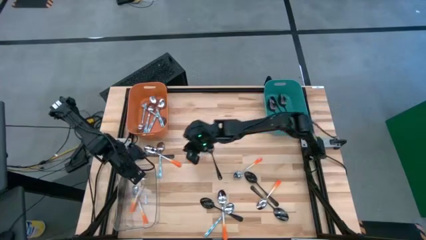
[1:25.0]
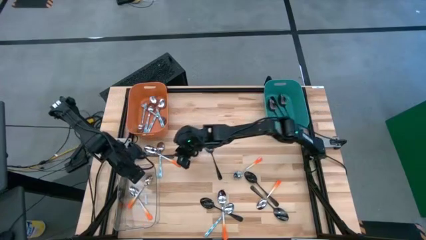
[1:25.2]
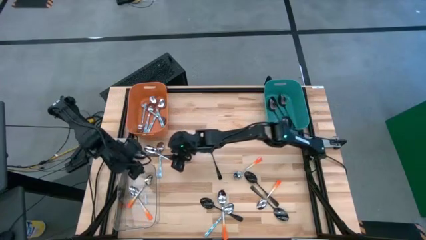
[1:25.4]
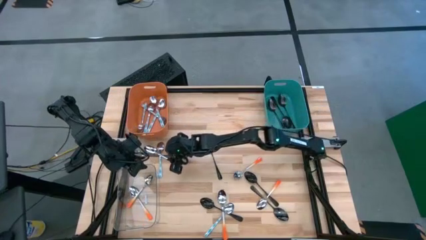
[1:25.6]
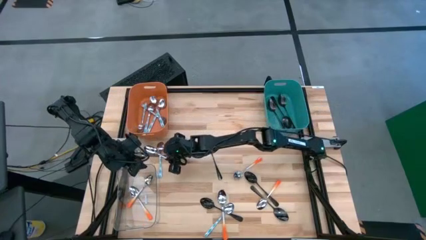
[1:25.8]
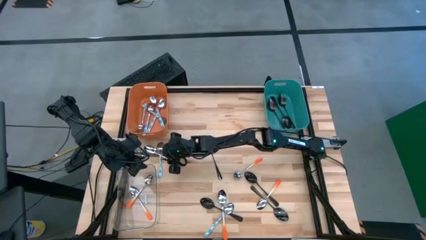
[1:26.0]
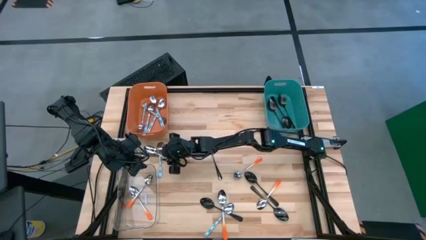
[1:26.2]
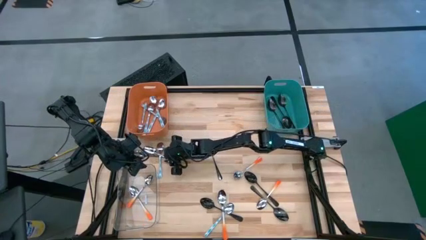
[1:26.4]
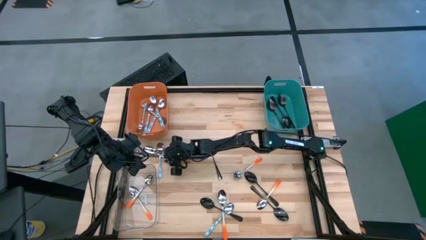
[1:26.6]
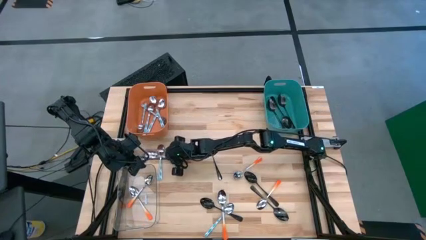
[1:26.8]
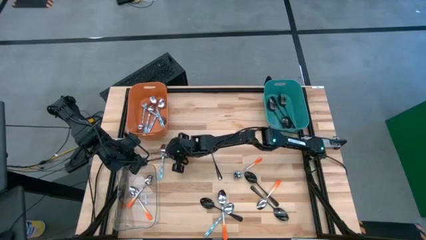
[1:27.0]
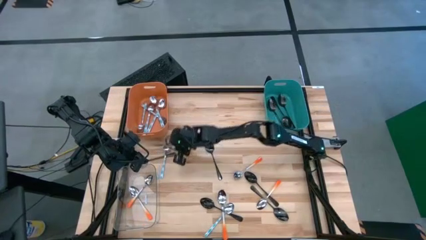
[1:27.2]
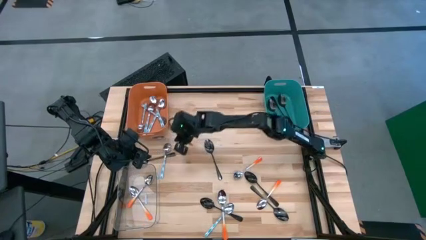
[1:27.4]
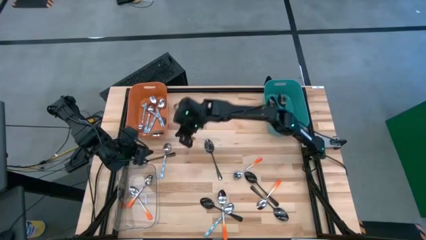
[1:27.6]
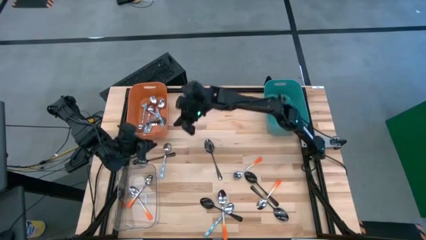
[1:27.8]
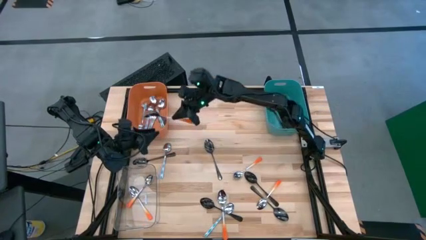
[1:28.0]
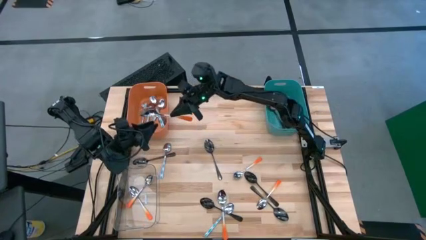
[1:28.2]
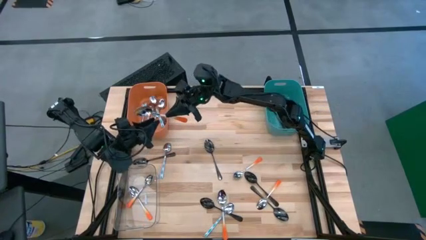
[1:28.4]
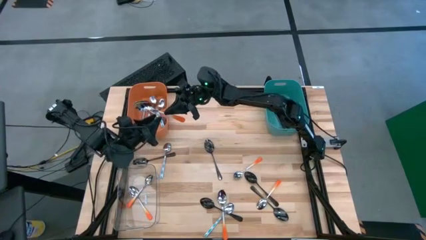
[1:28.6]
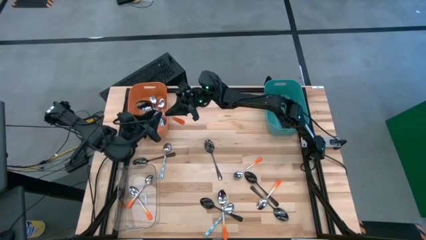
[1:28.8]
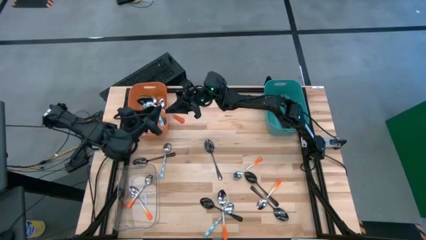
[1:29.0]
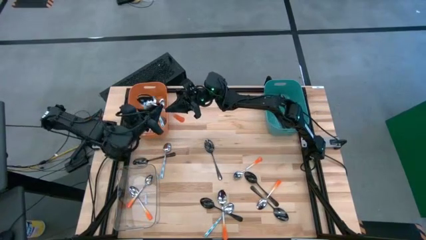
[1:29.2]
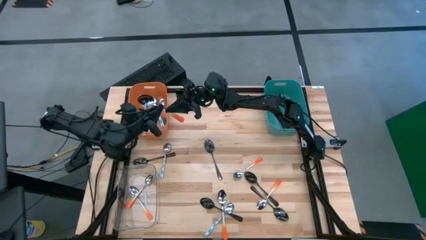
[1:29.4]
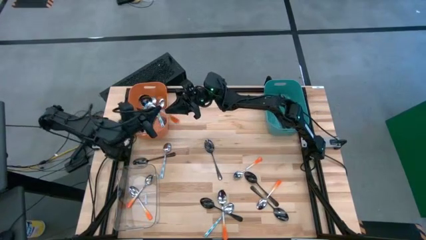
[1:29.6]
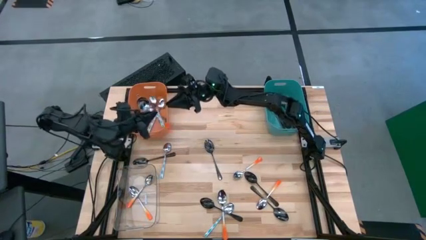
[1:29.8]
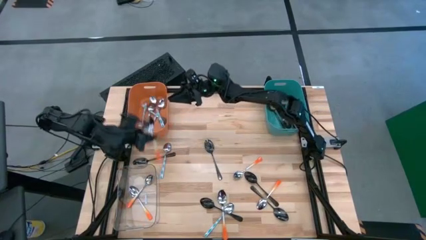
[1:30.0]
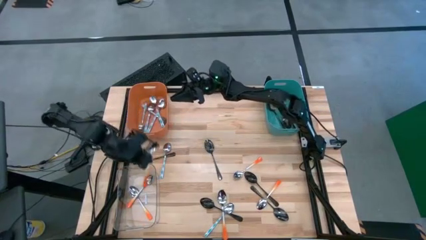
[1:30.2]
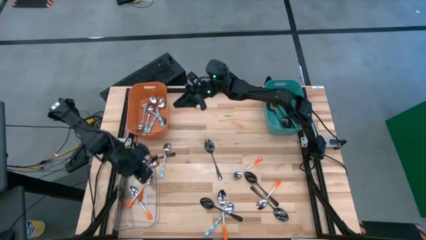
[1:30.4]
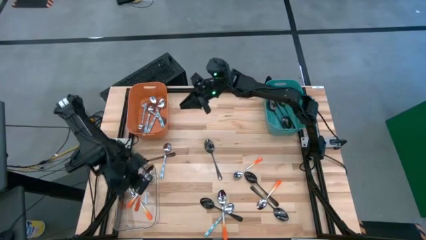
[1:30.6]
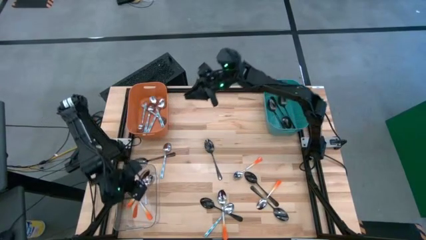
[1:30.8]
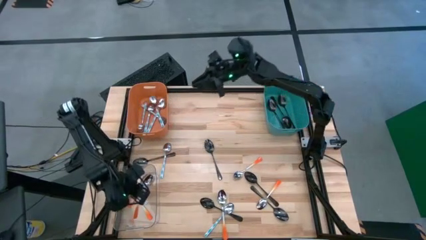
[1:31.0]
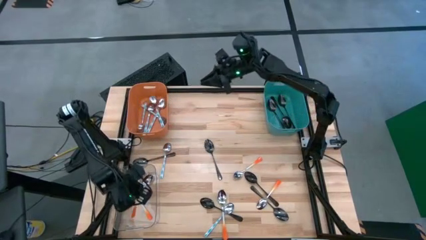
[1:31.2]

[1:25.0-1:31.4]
Task: Sort silverware by color (type)
Put the orange spoon into the transparent bin

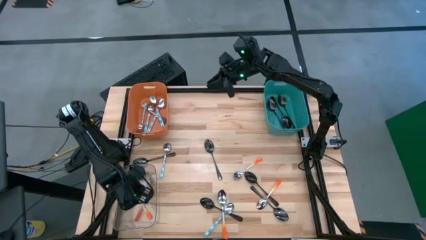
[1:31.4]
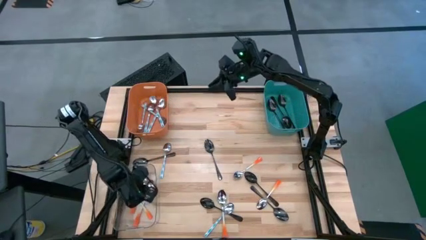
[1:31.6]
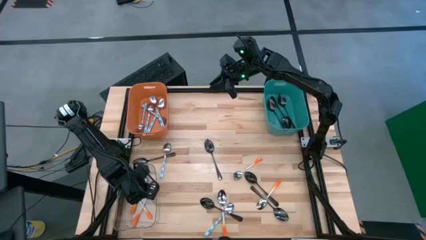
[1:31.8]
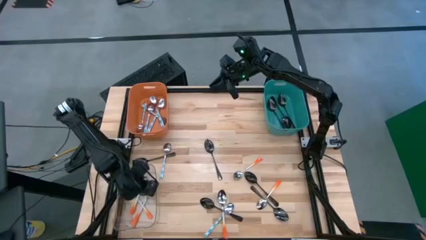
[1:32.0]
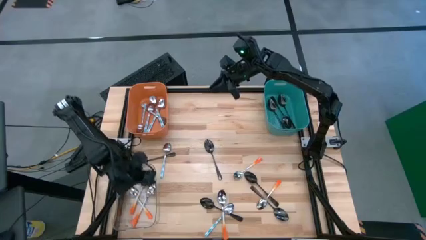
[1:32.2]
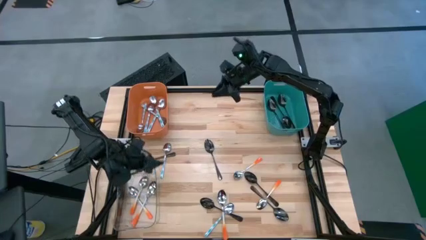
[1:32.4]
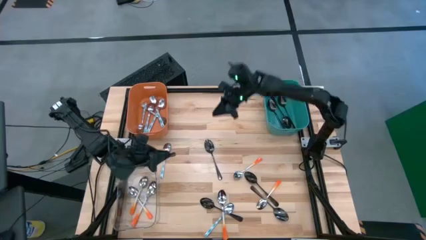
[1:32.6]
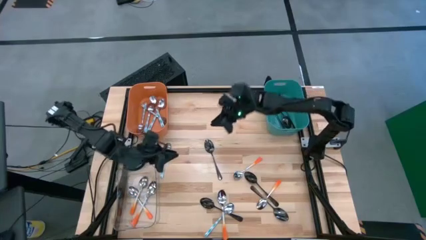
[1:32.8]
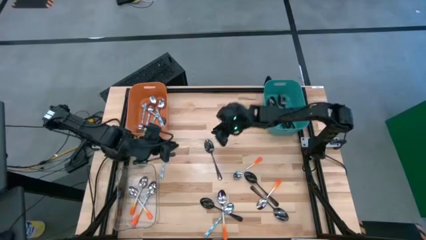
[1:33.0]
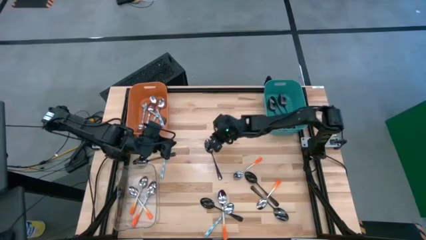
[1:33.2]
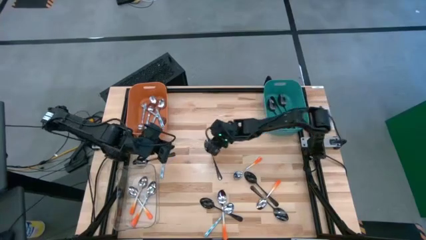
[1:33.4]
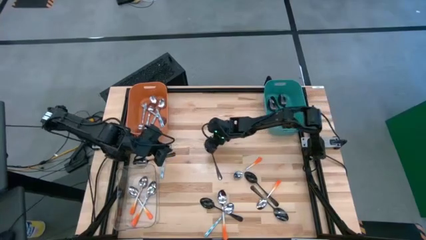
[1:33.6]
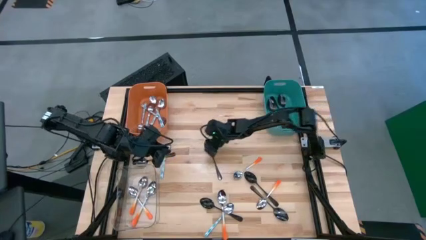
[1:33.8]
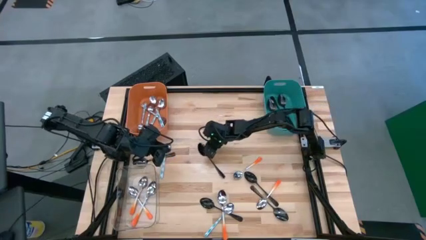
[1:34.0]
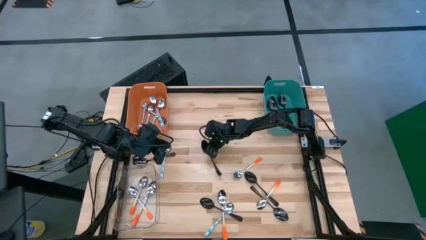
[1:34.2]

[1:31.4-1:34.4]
Put the black spoon into the green bin

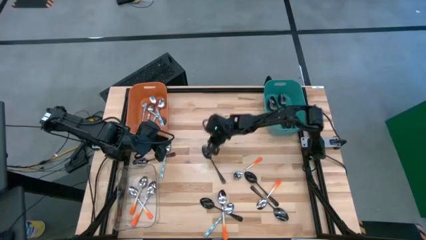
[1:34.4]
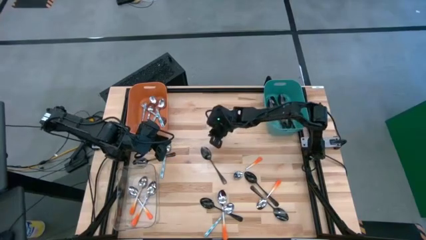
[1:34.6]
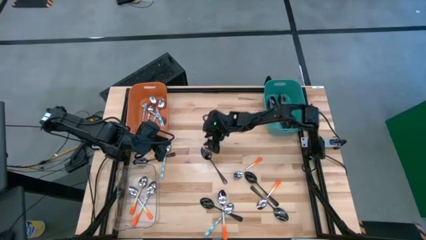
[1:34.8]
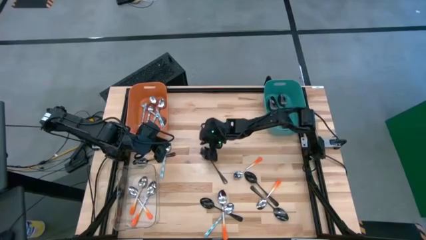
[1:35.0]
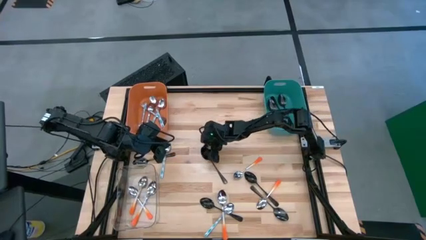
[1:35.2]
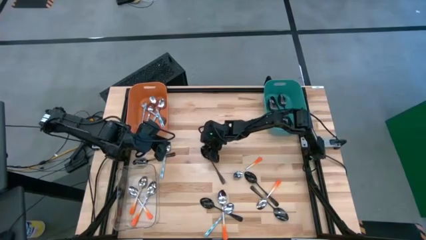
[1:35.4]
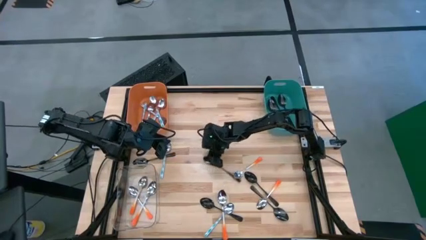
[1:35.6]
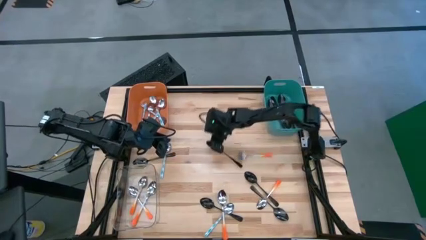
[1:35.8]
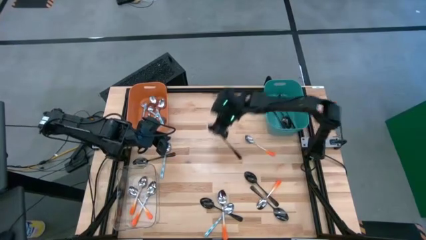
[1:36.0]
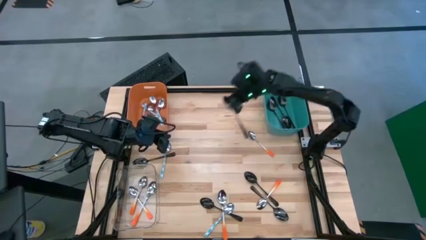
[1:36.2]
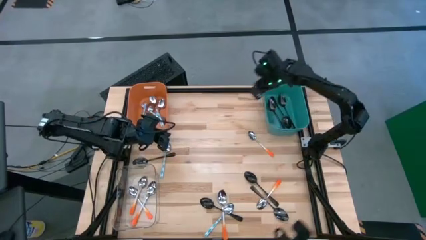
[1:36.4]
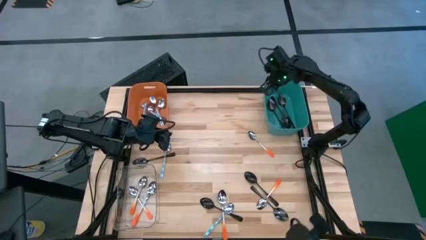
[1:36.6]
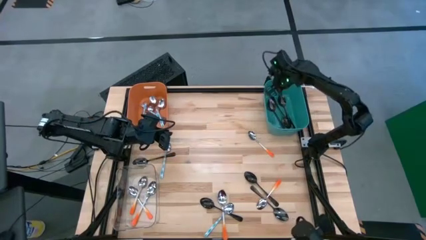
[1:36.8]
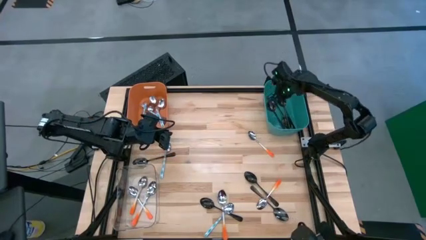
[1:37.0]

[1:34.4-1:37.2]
Put the black spoon into the green bin

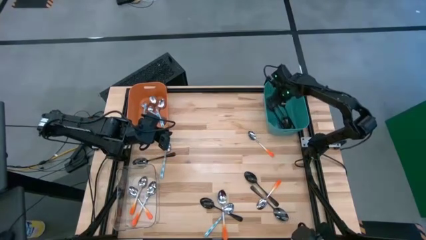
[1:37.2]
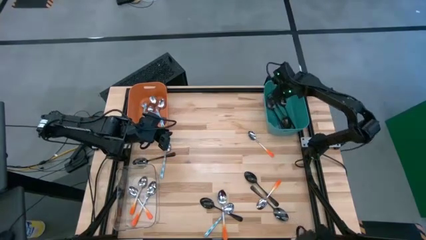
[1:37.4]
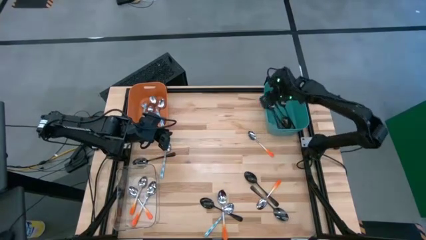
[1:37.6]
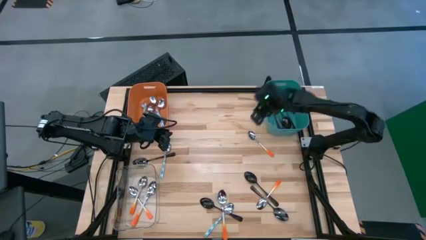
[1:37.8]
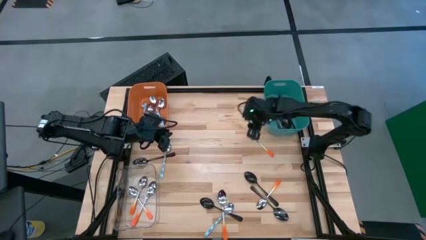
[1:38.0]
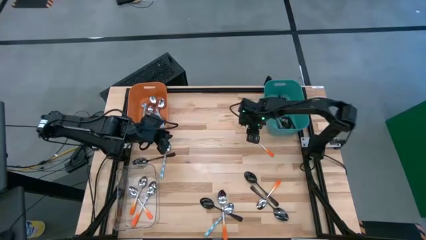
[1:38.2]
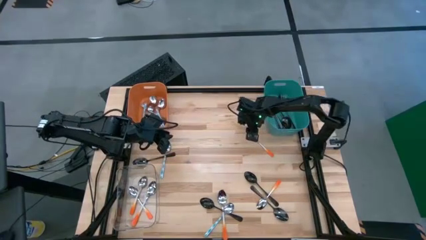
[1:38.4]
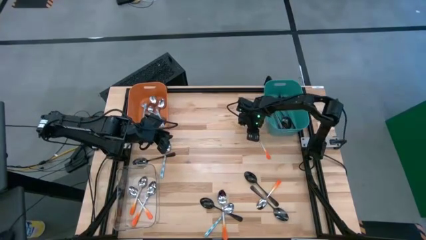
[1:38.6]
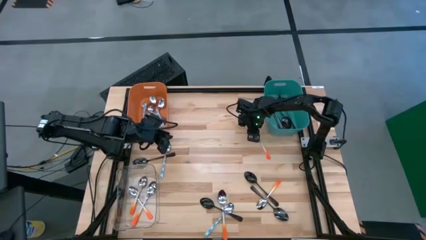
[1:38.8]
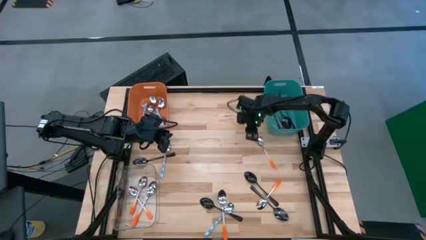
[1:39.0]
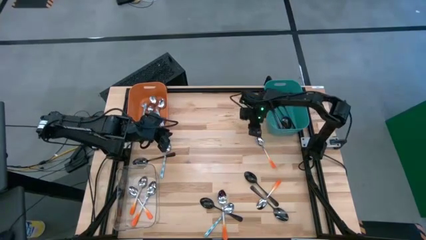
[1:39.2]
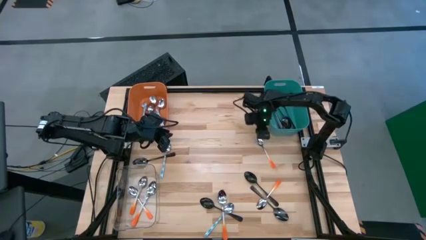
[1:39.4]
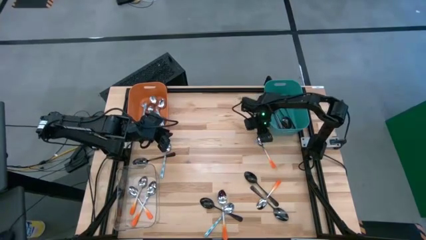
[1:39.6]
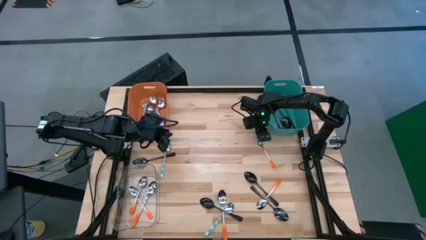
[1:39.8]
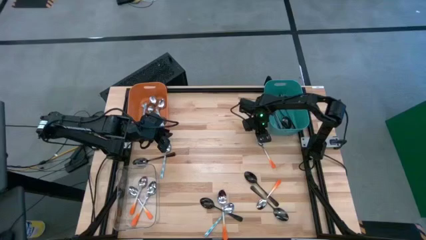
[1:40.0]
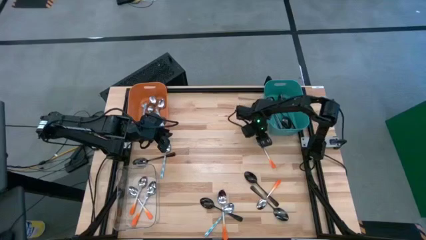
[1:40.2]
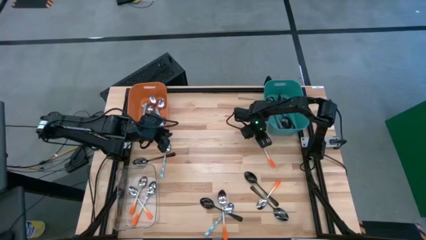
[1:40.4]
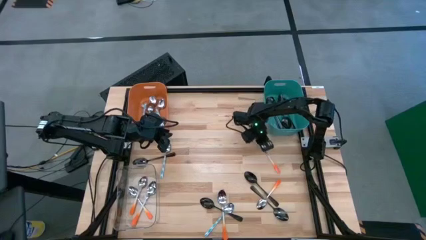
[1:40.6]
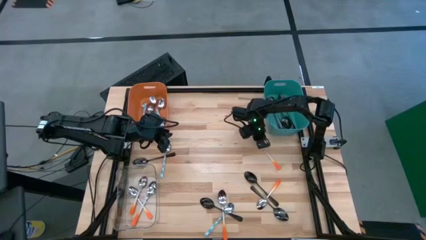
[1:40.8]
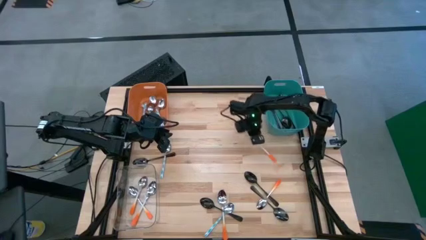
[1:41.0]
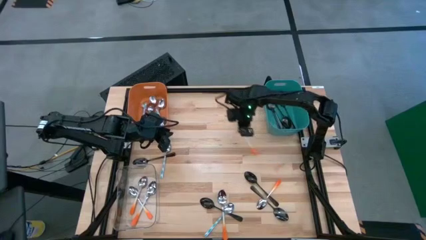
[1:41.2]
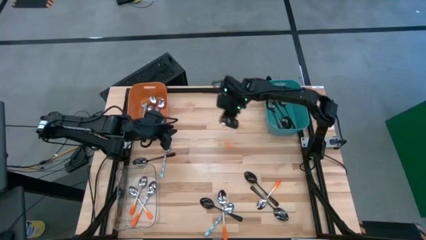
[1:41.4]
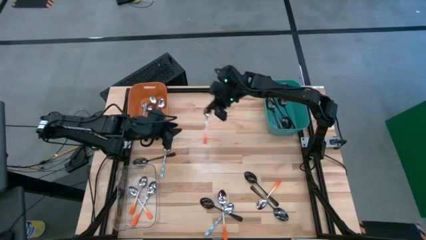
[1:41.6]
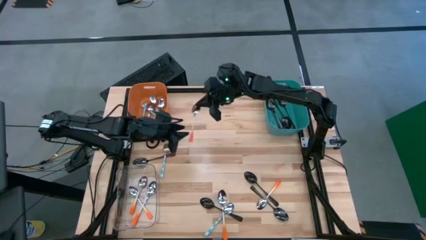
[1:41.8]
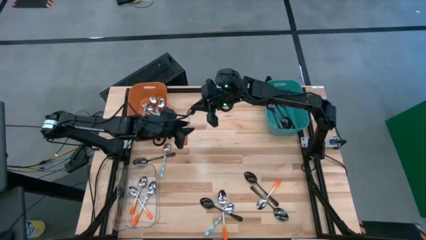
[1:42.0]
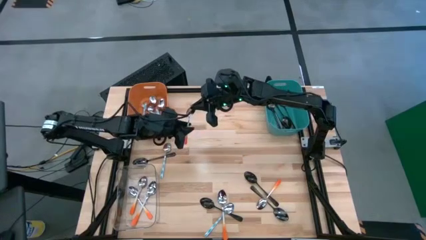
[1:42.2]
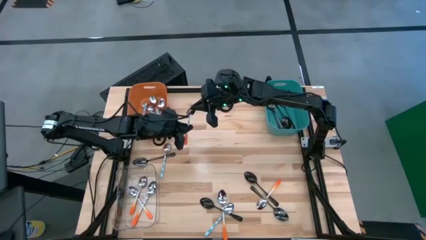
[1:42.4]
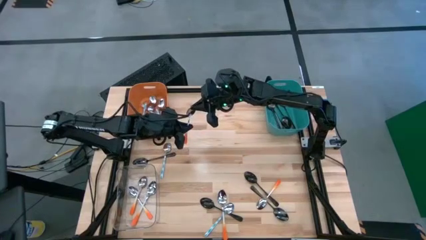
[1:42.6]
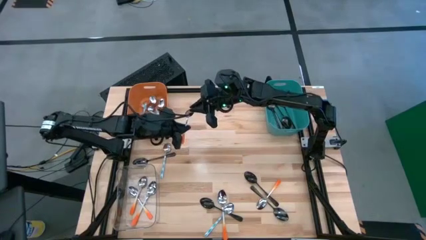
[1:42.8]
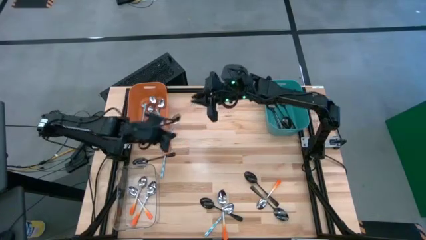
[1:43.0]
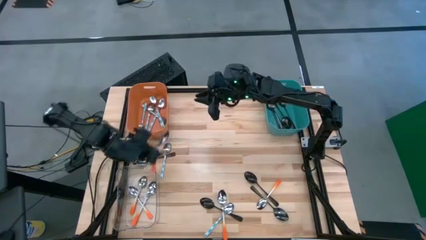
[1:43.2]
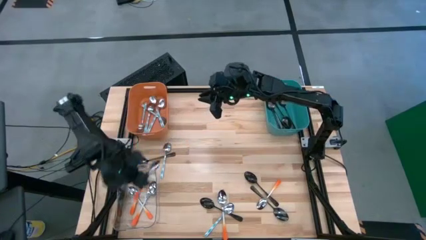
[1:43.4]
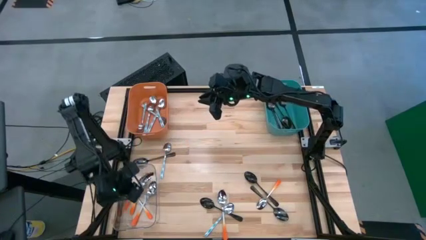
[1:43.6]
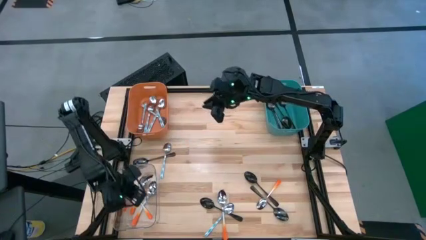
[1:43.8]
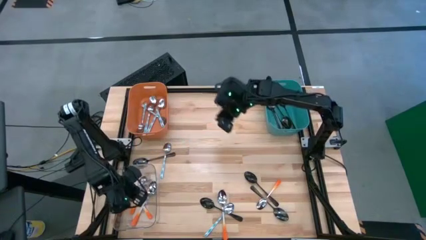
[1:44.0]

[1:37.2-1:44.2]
Put the orange spoon into the transparent bin
